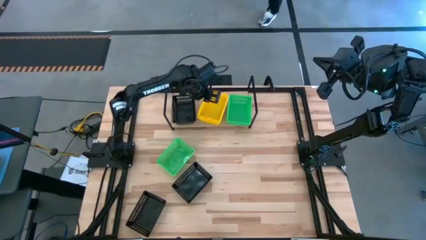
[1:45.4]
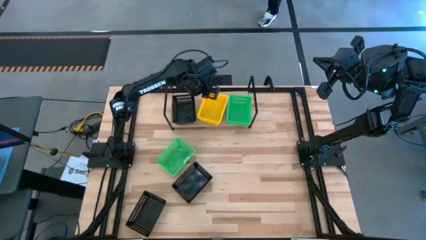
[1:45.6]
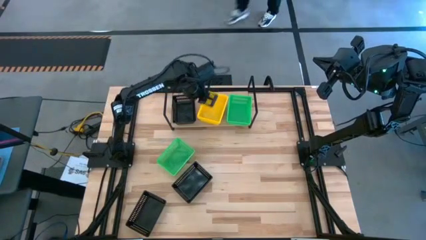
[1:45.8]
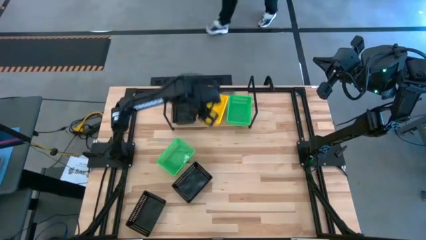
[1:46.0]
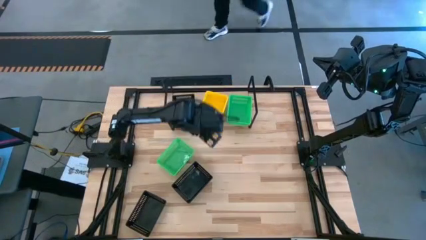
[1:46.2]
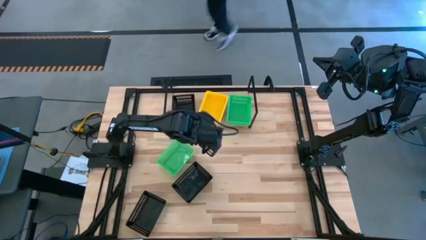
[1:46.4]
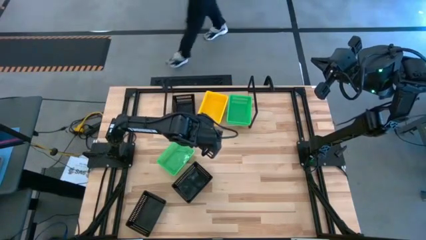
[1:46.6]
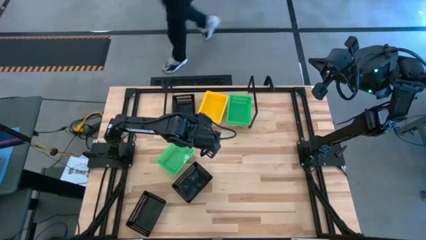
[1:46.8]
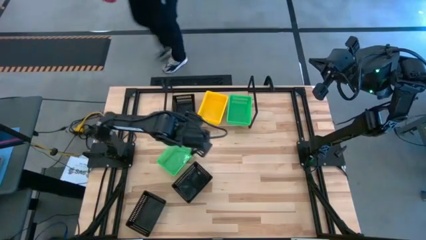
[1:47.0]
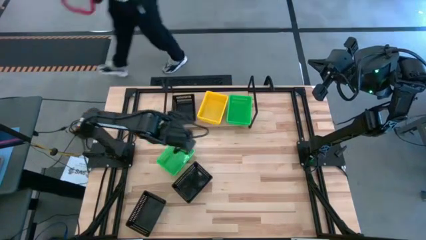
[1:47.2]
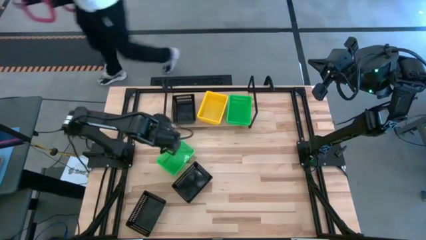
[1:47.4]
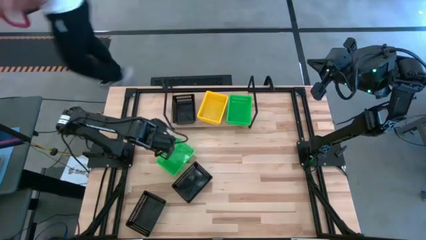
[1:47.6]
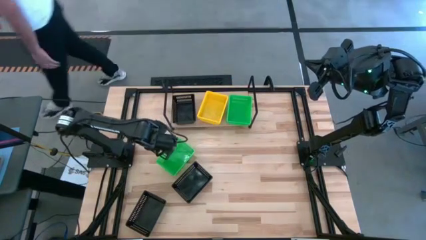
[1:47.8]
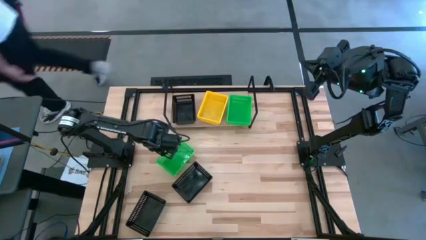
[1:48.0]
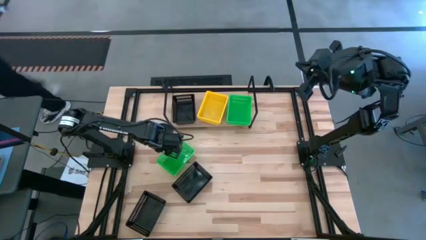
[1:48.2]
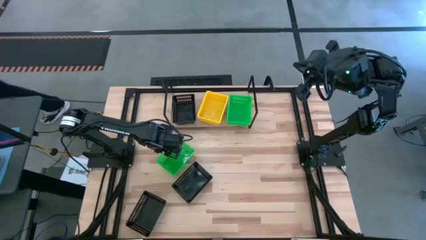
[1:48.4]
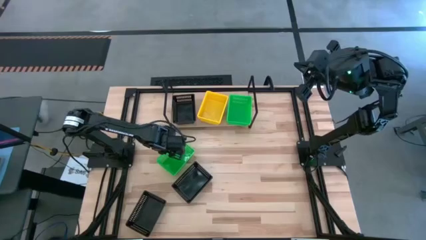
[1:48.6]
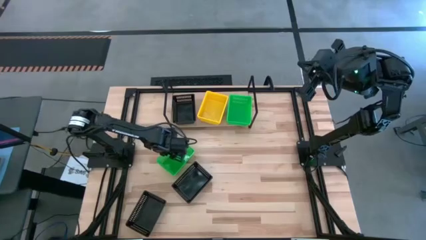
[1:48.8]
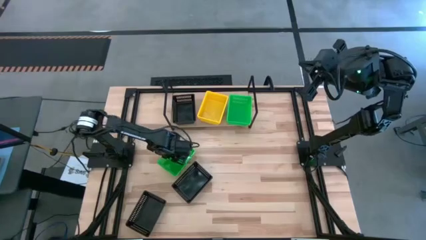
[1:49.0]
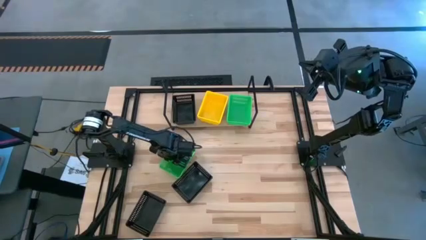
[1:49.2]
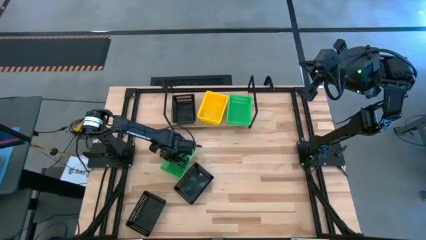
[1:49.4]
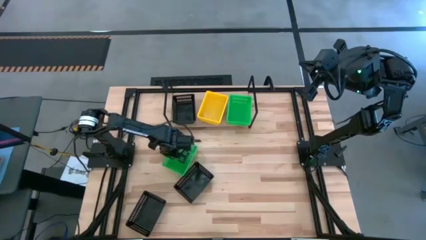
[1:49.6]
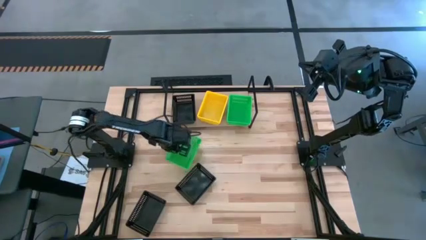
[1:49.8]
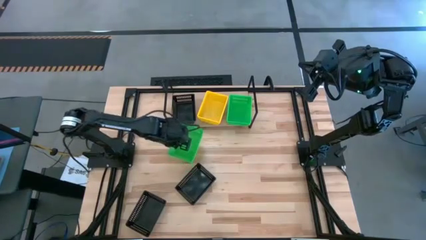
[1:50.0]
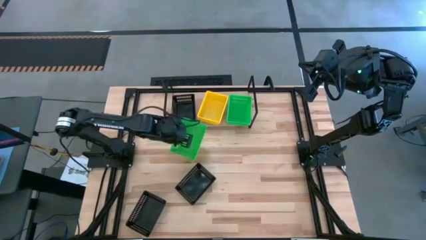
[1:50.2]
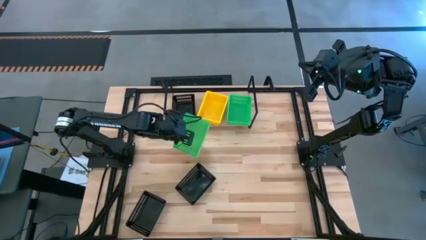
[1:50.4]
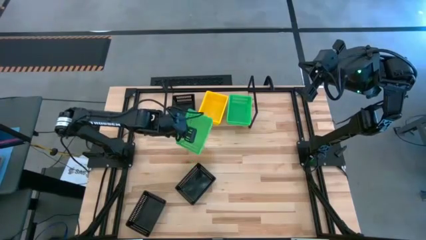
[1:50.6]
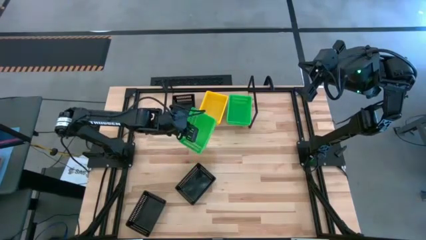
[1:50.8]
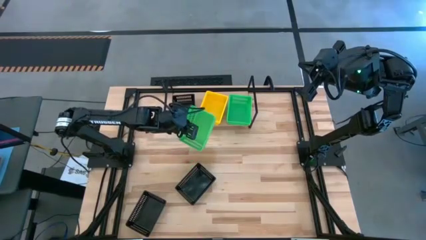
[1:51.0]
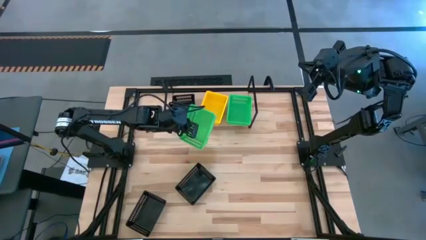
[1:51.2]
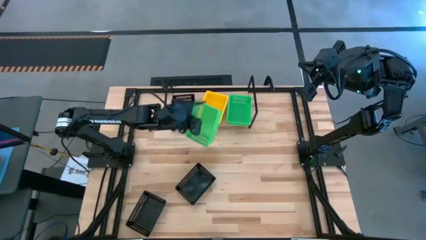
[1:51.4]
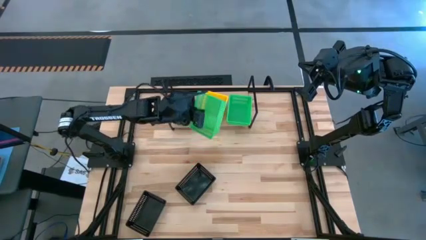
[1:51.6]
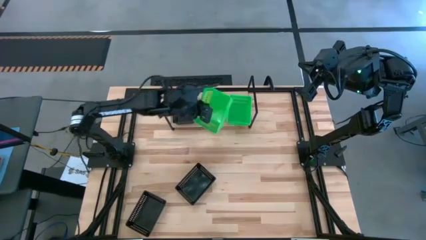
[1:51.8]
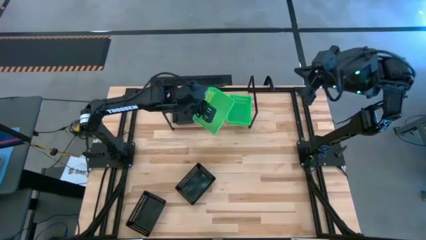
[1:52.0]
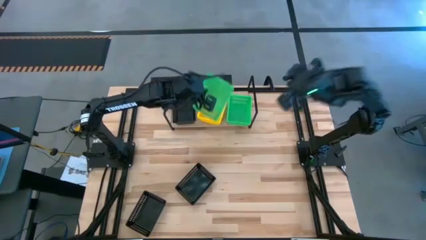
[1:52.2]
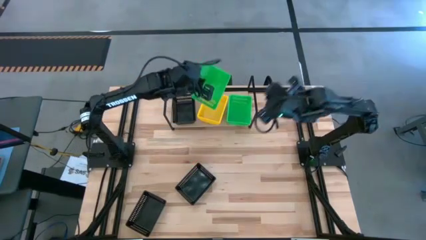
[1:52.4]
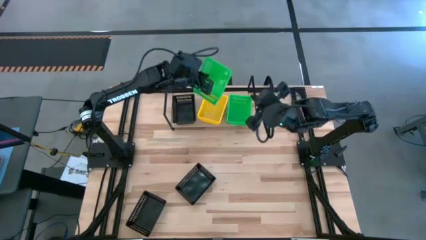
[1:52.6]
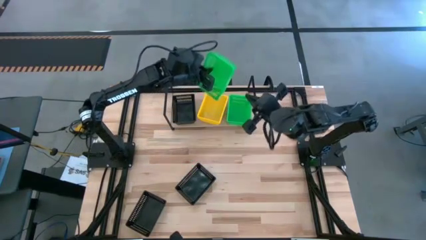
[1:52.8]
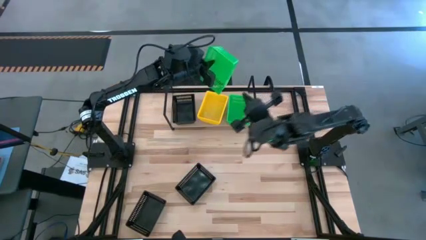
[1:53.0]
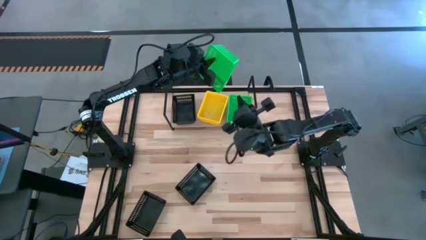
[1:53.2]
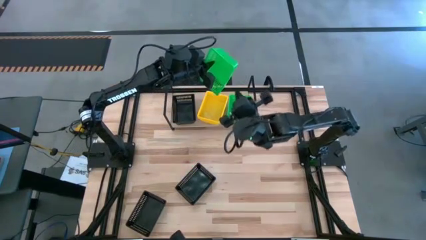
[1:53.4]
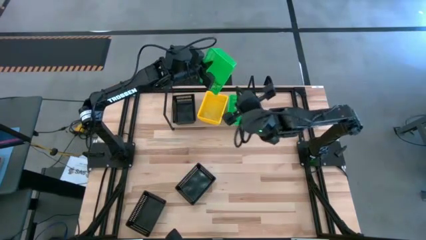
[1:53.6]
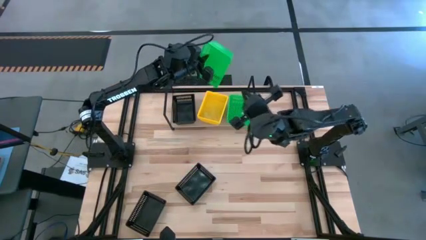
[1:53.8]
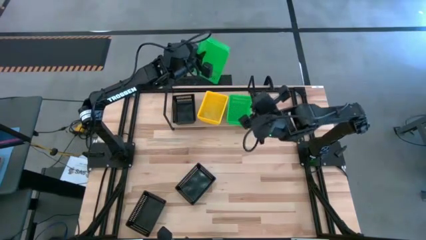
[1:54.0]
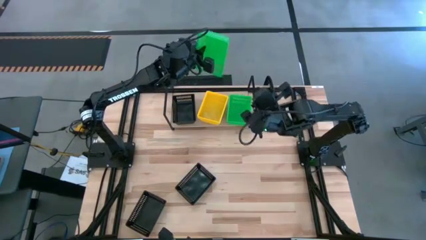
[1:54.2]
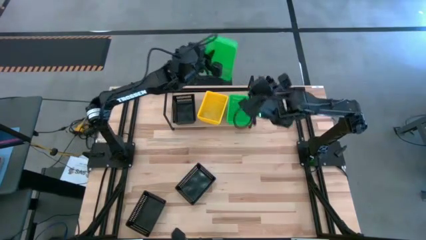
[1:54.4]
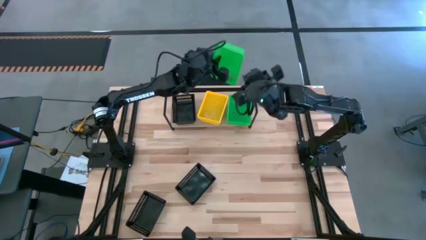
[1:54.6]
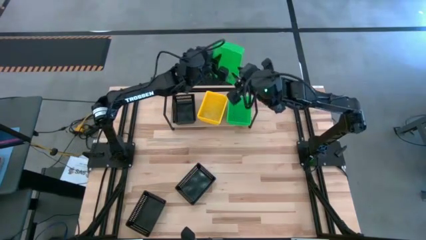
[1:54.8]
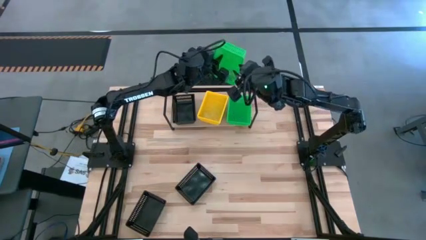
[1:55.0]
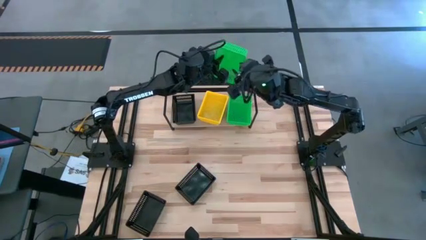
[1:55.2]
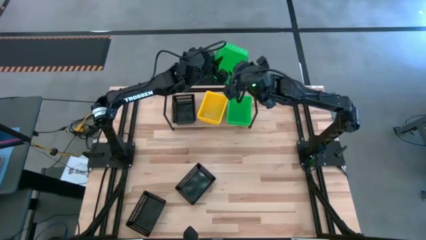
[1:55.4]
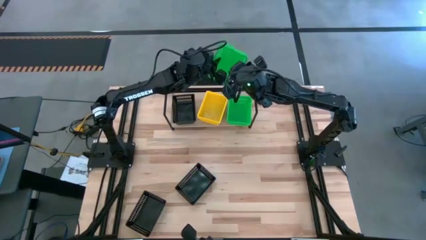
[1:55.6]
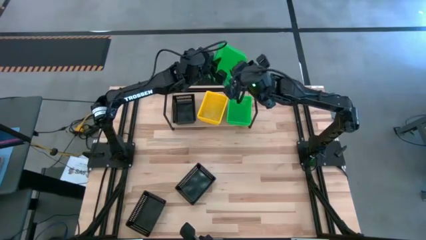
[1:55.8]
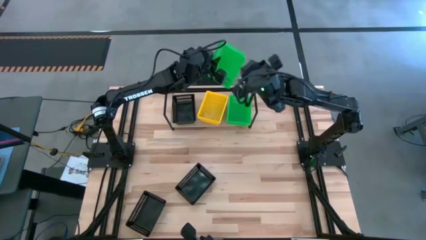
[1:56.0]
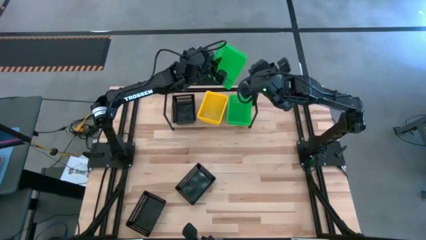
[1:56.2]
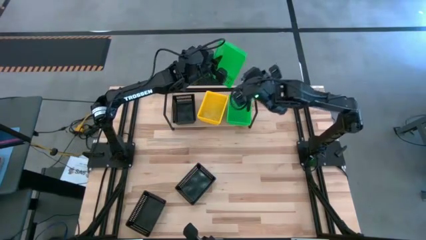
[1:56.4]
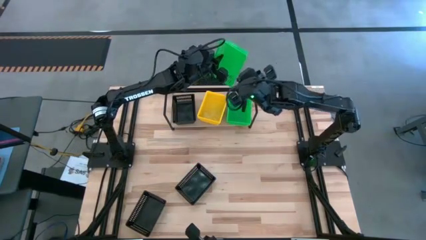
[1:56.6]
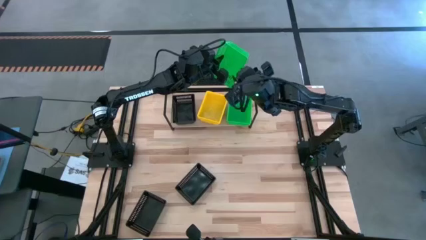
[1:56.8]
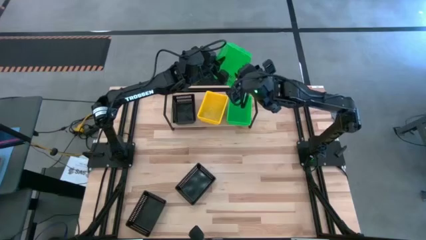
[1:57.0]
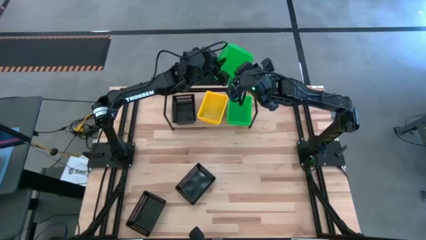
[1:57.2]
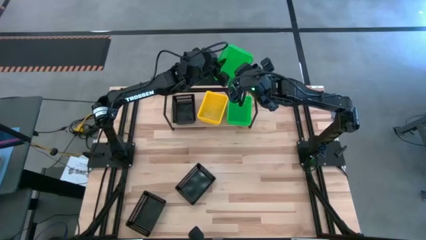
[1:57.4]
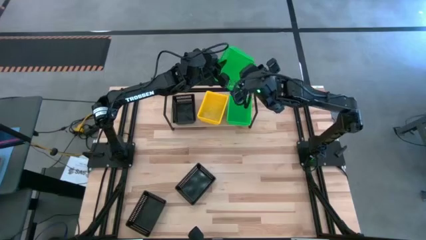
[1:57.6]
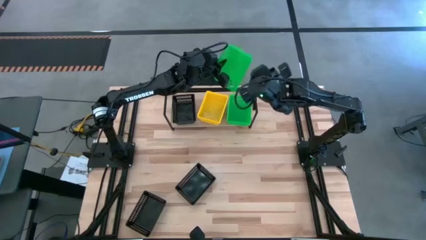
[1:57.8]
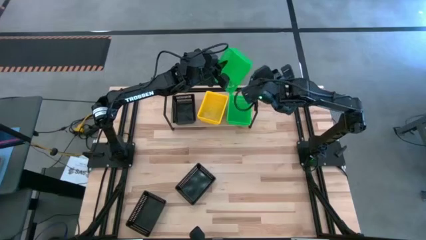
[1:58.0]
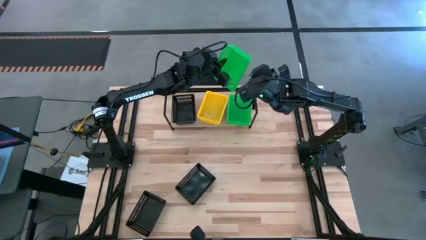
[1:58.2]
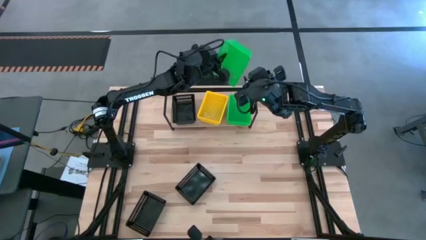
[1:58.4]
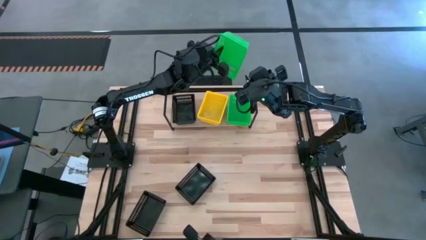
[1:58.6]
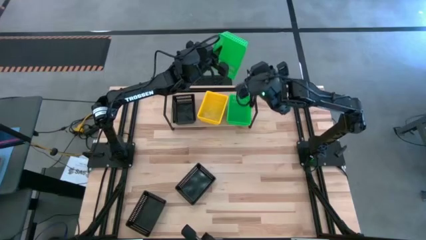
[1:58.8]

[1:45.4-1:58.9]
Task: Stack baskets on shelf by color
Stack the green bin on top of the green bin on the shelf

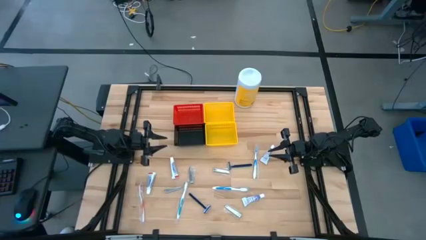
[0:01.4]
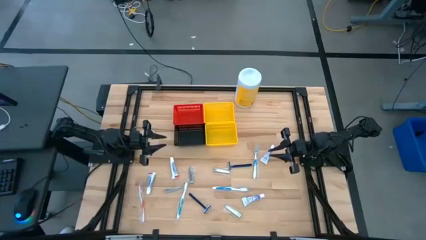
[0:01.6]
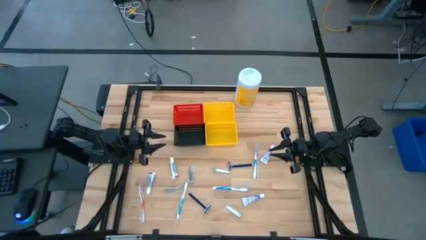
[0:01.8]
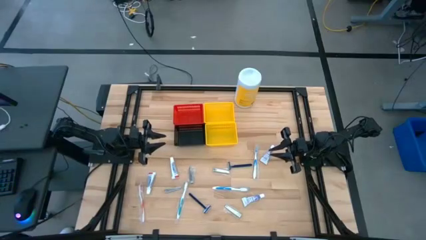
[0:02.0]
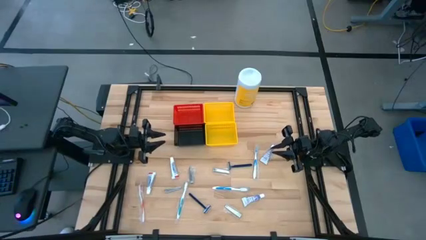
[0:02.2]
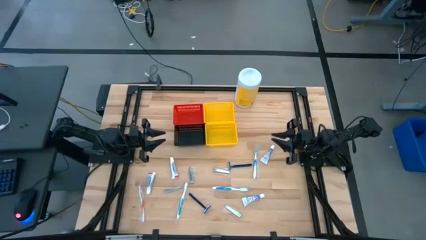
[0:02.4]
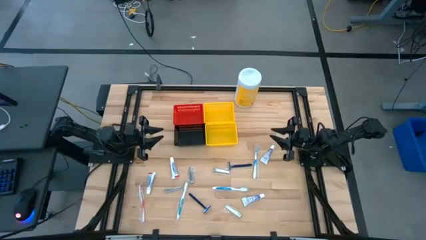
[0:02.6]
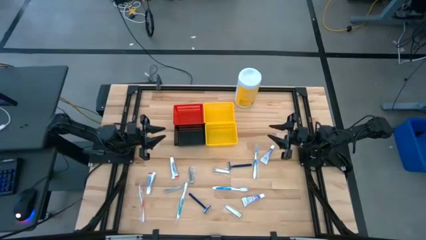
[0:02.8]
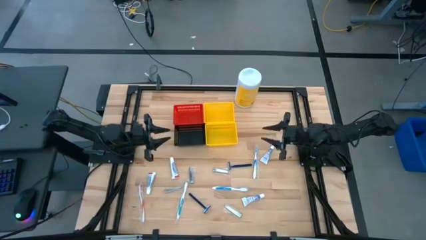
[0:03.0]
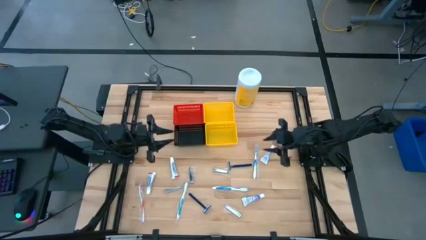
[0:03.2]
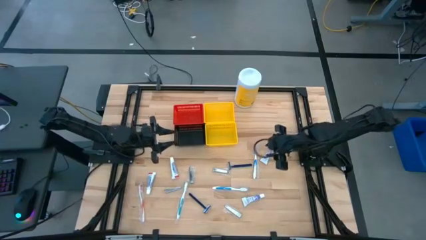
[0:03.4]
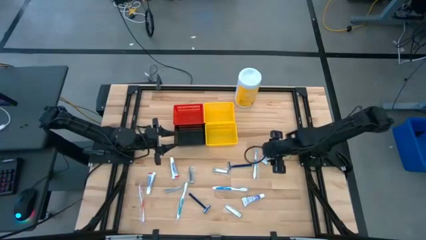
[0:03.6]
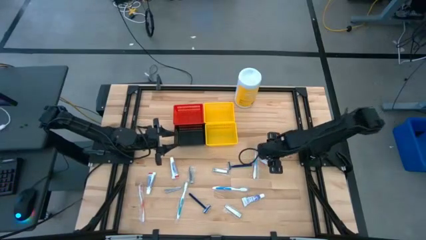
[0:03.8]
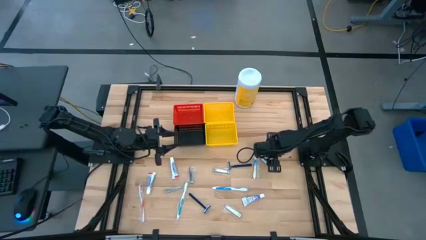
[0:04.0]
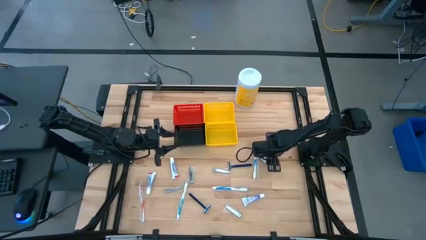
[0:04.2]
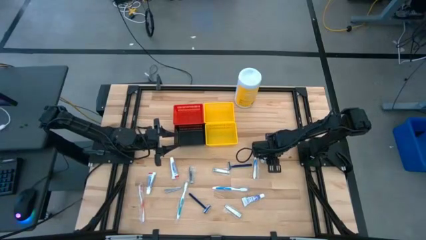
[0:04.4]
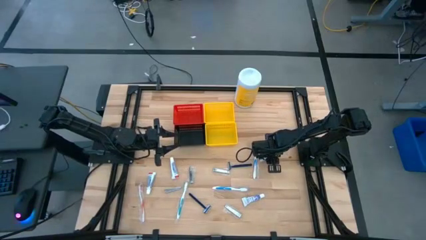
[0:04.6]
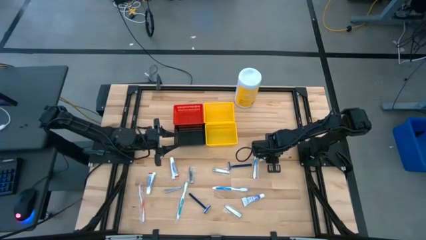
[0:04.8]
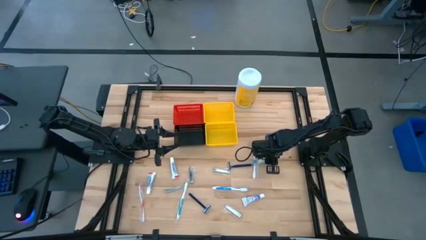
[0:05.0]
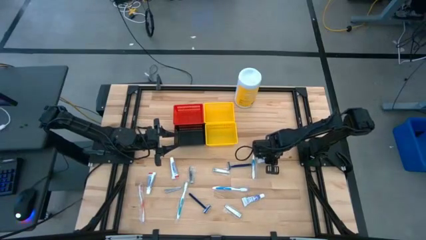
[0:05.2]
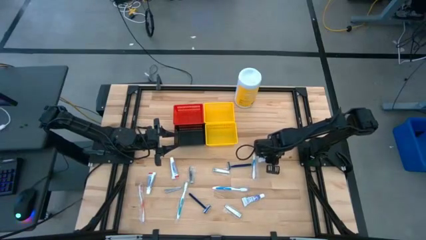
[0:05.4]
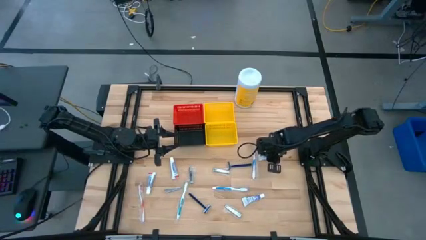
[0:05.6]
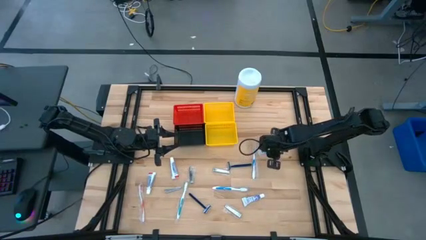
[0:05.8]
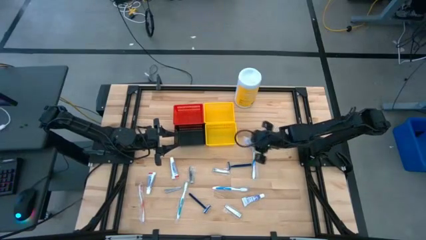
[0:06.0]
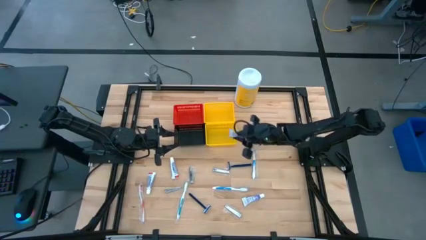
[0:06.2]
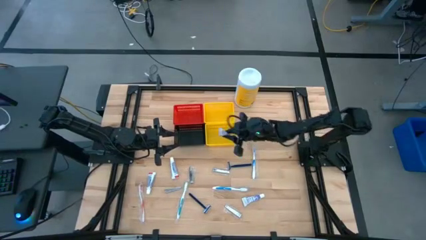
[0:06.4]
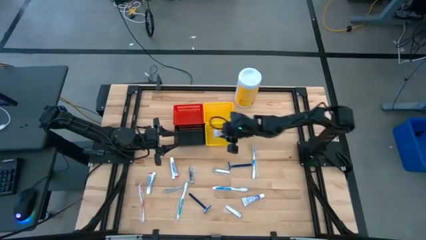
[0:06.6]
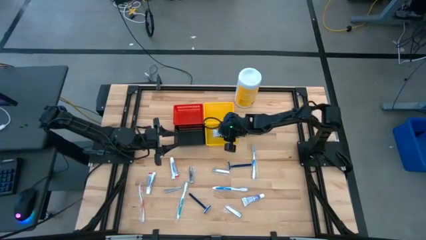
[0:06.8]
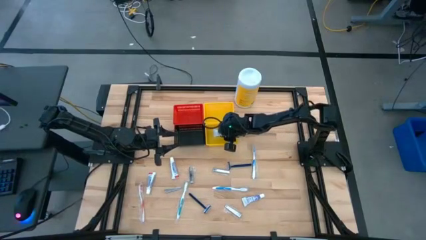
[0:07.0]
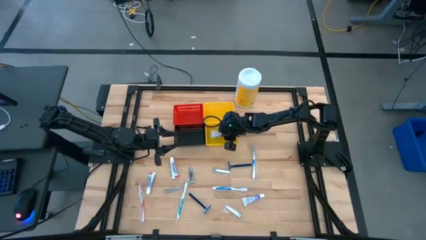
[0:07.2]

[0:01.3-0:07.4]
Task: Pick & Place Travel size toiletries
Put the white toothpaste into the bottom yellow bin
